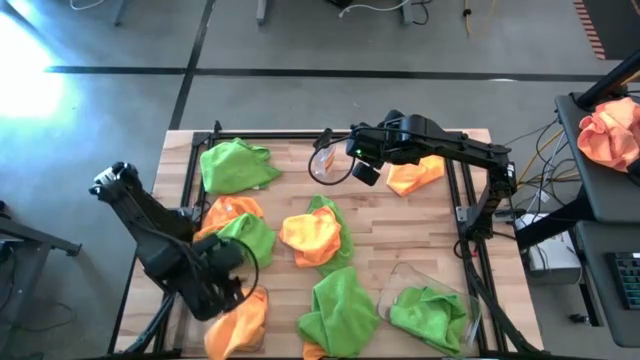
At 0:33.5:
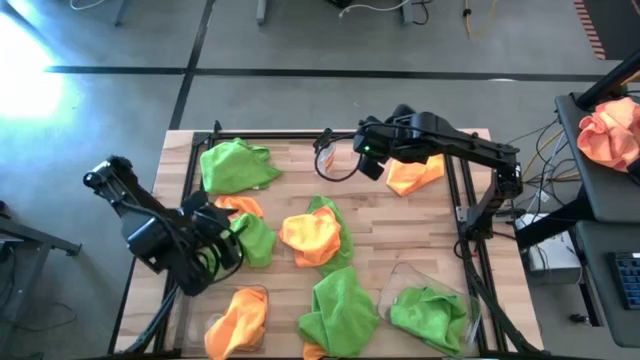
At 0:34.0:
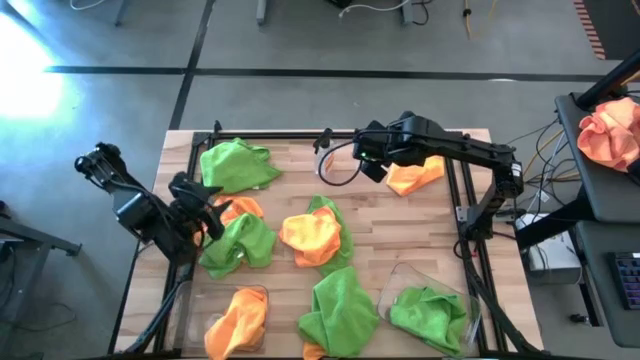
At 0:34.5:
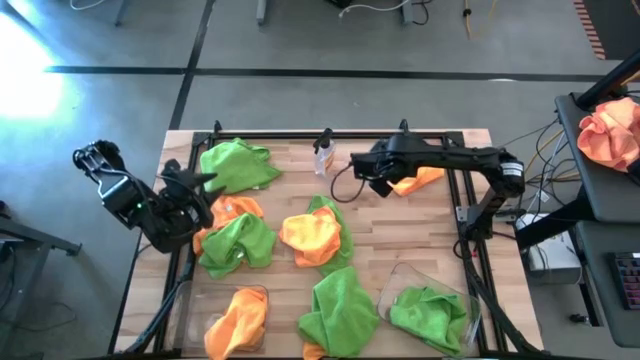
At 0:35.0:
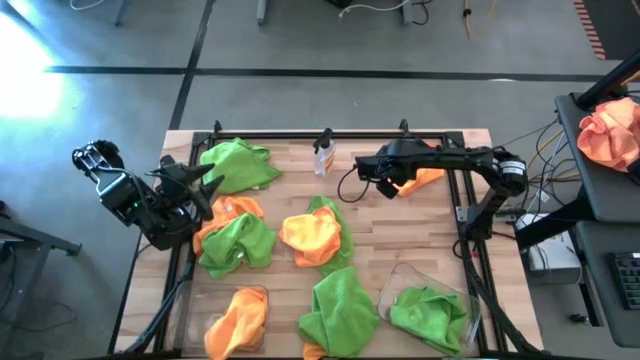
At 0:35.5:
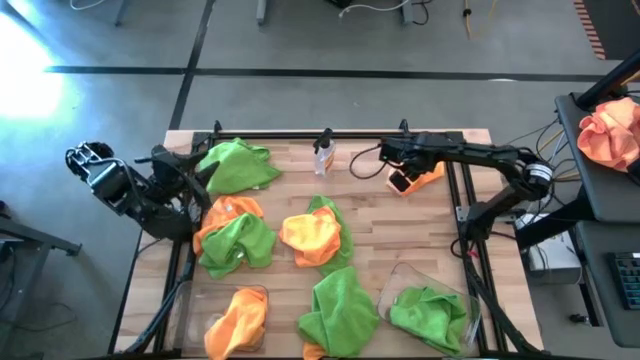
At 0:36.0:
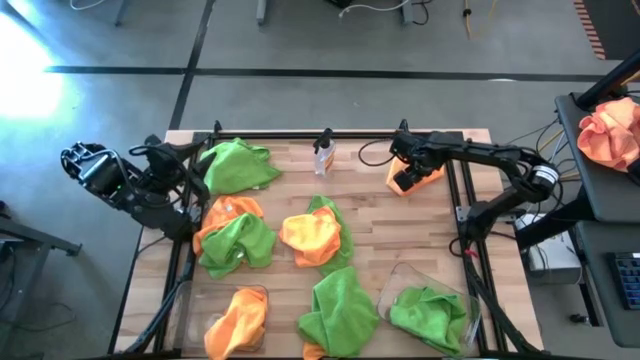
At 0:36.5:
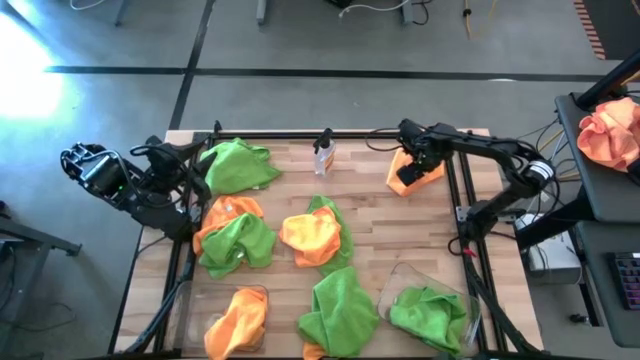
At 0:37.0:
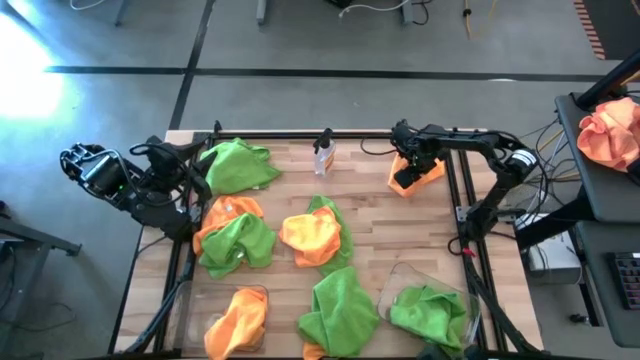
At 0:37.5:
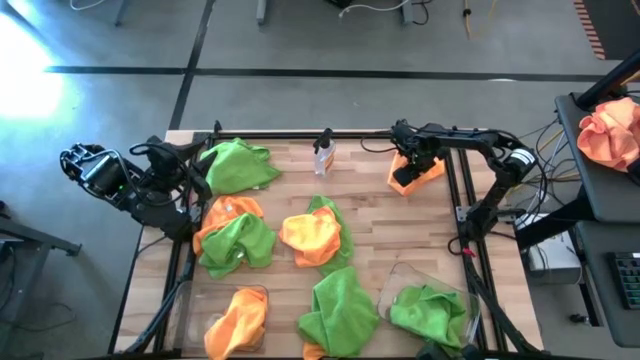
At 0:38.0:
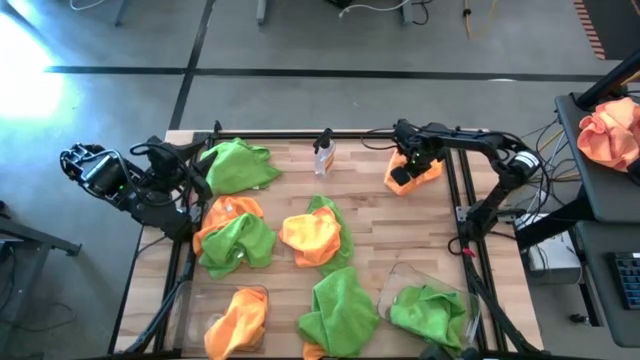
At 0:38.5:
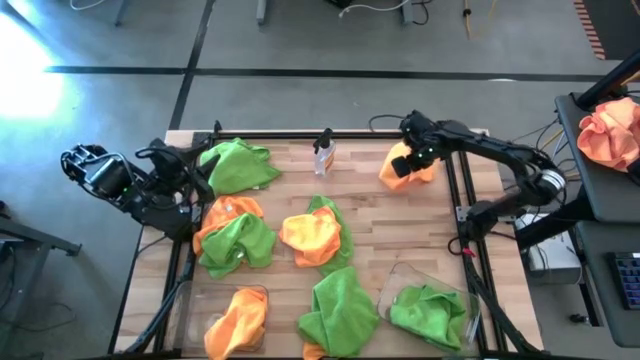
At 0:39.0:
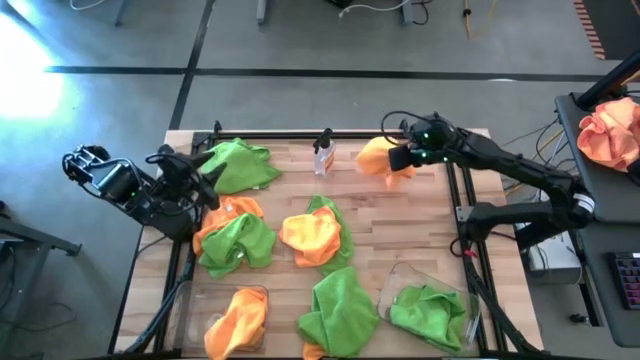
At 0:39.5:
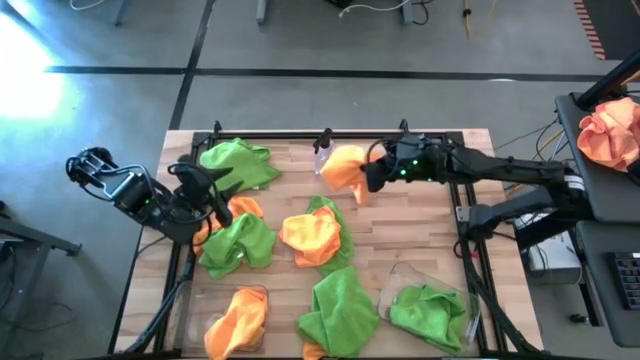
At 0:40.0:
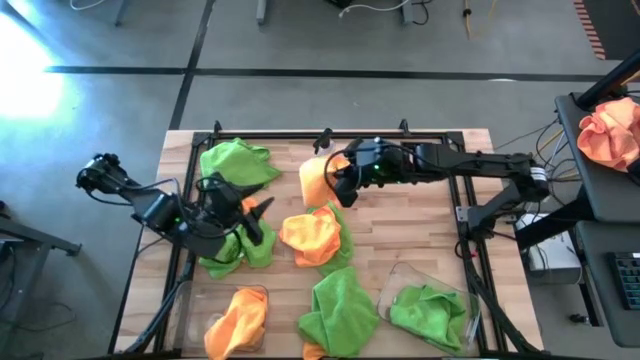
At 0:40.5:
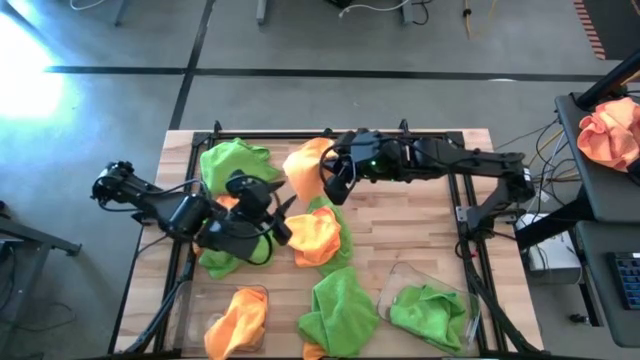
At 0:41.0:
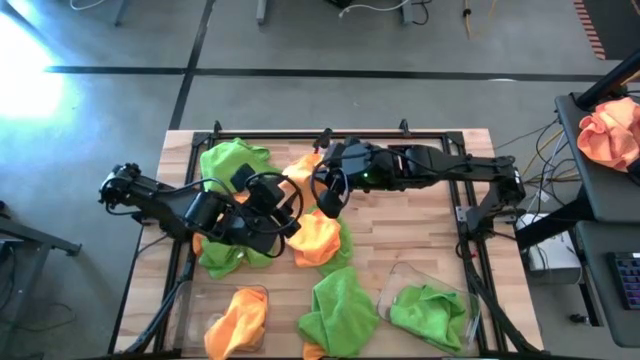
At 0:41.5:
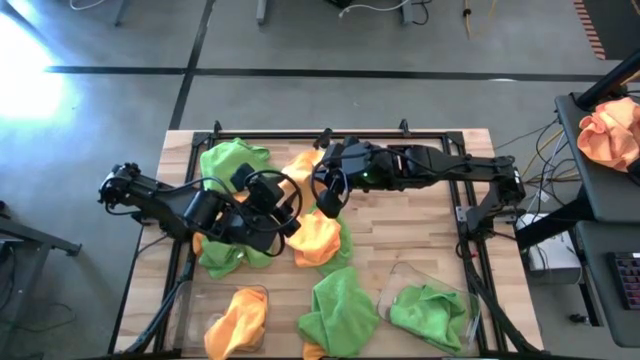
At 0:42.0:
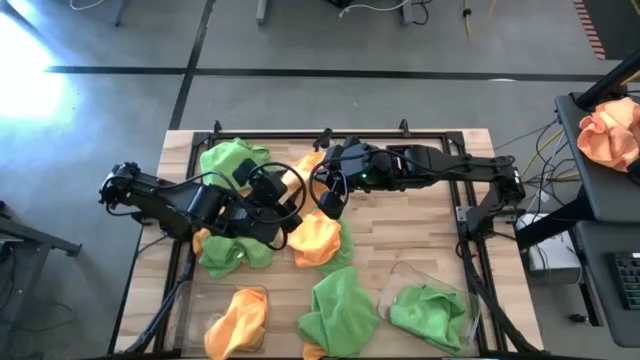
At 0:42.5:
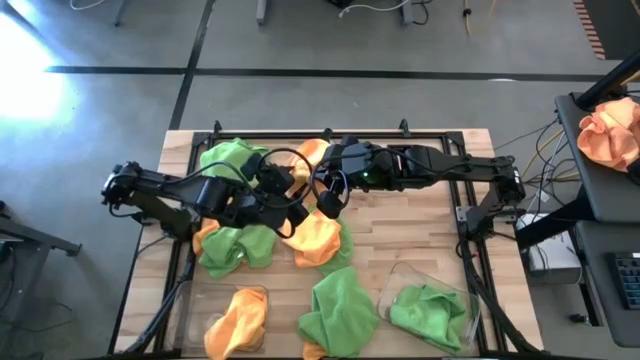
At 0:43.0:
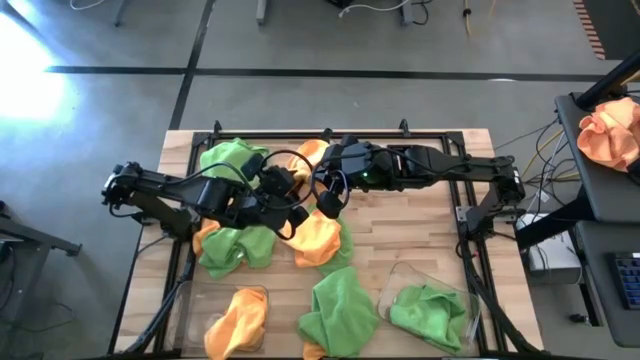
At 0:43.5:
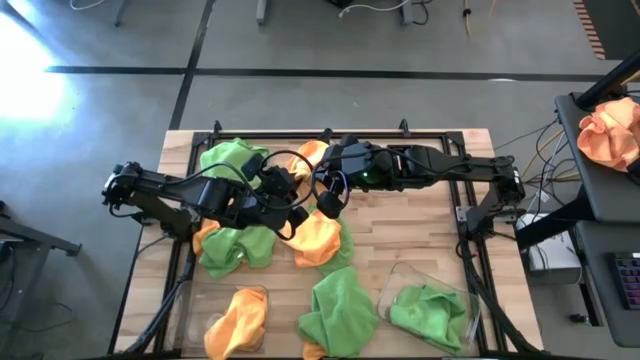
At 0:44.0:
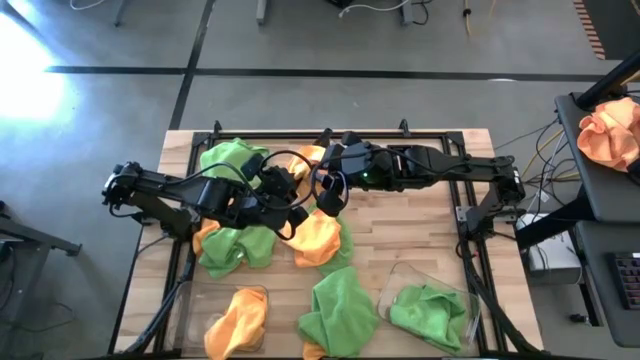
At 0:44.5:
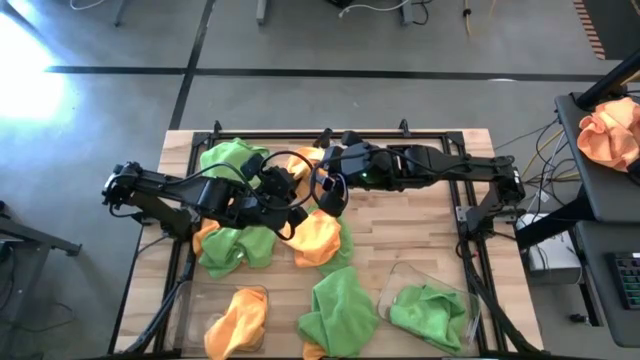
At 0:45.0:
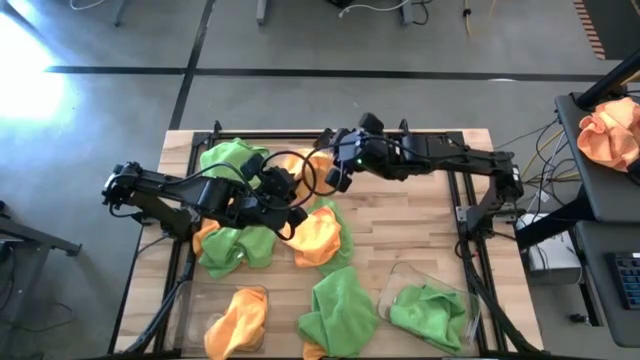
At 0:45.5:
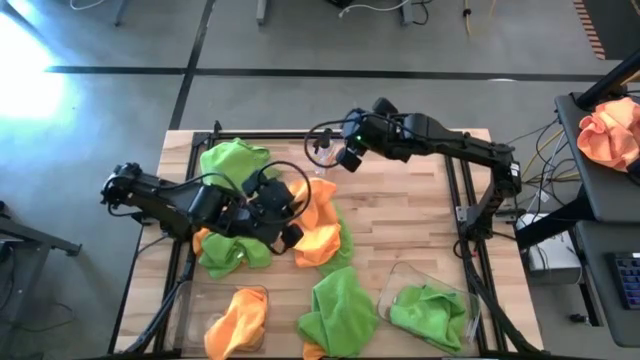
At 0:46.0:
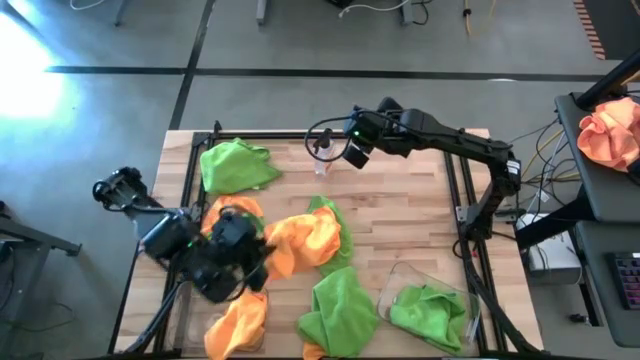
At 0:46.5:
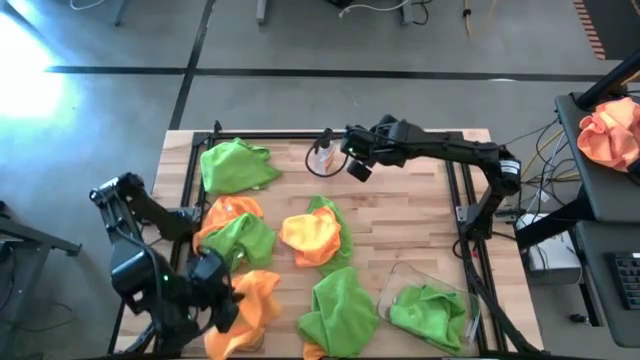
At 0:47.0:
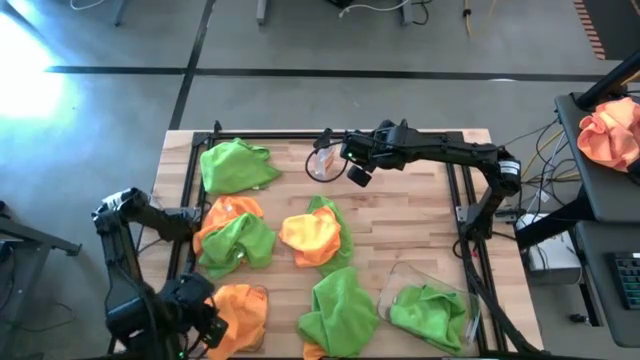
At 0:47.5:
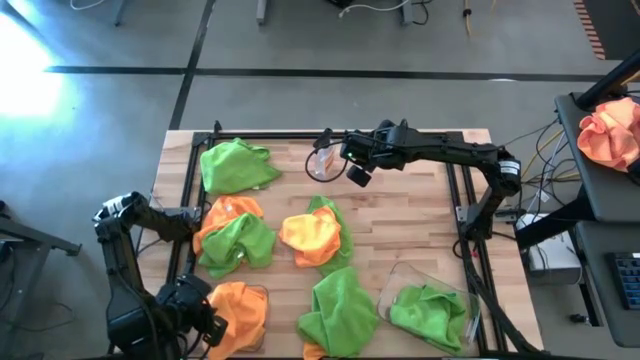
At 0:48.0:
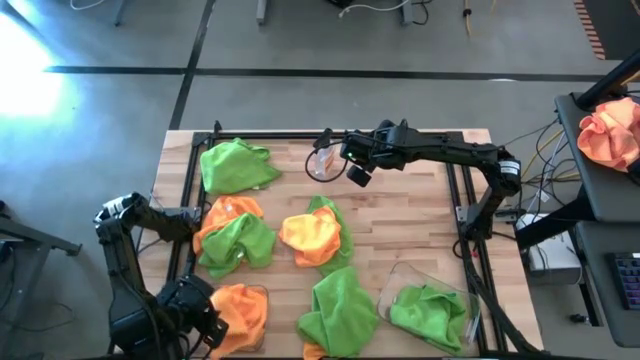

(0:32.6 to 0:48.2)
Task: Sort microfiber towel by color & place in baskets
Put the orange microfiber cloth into the left transparent bin

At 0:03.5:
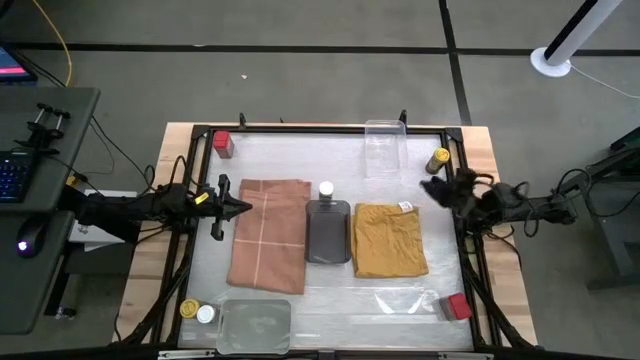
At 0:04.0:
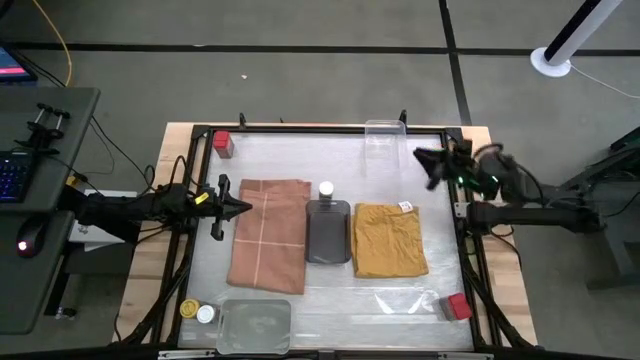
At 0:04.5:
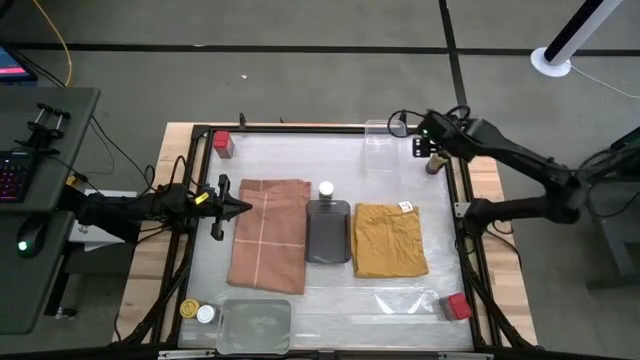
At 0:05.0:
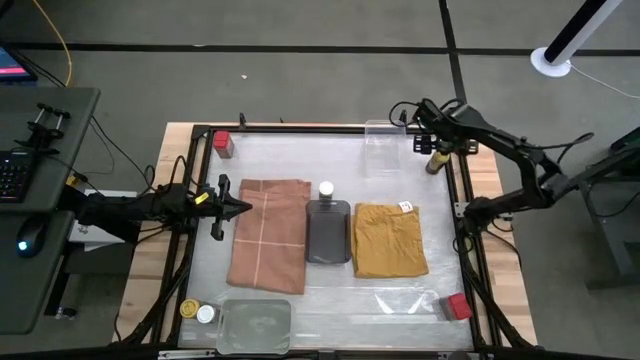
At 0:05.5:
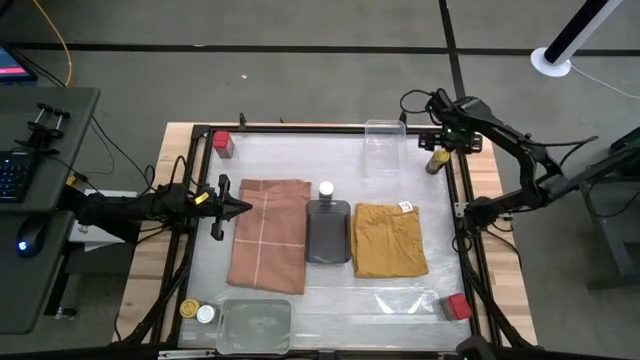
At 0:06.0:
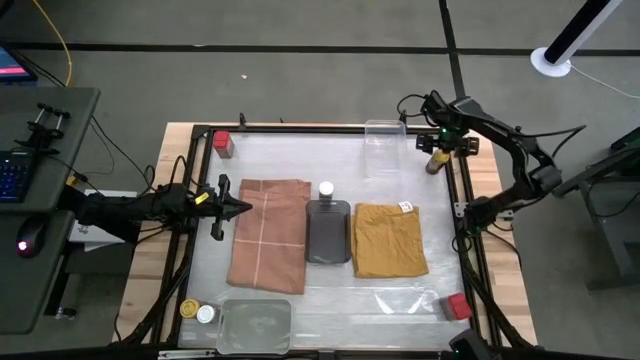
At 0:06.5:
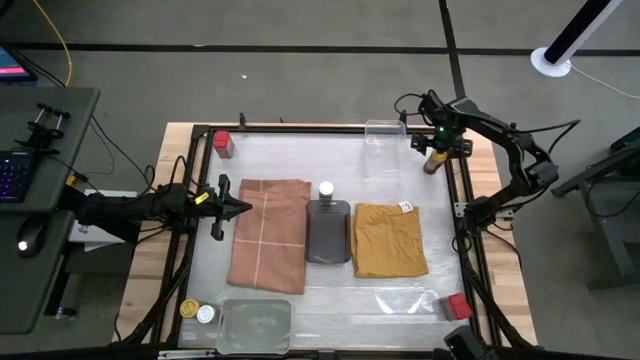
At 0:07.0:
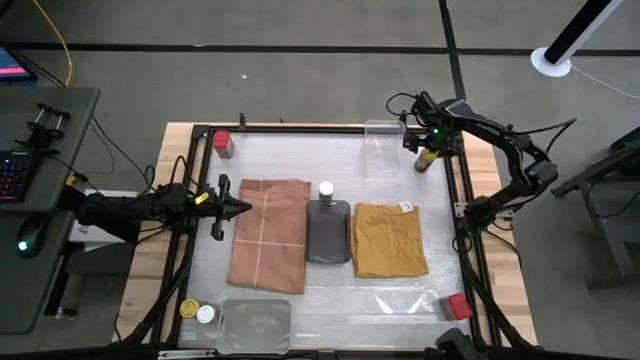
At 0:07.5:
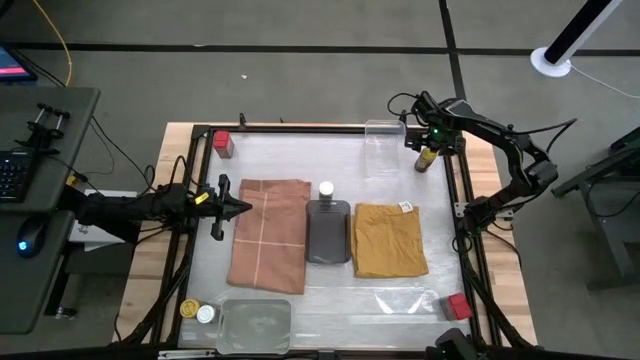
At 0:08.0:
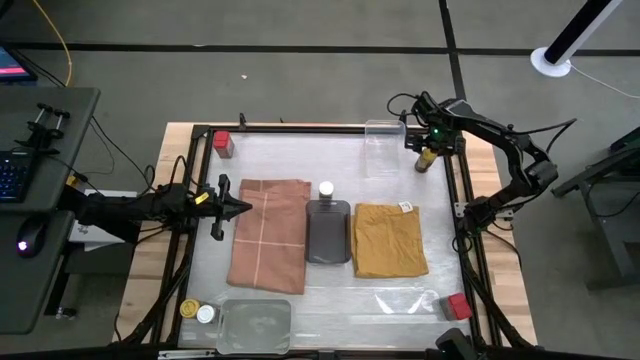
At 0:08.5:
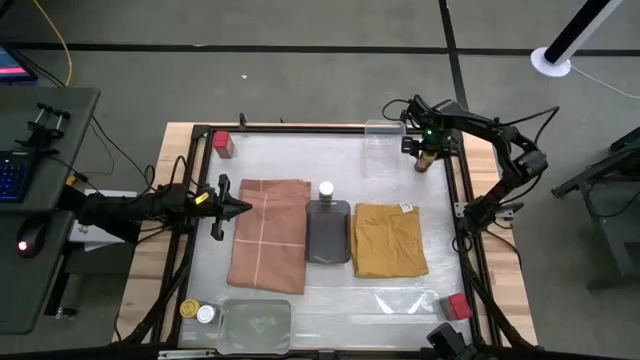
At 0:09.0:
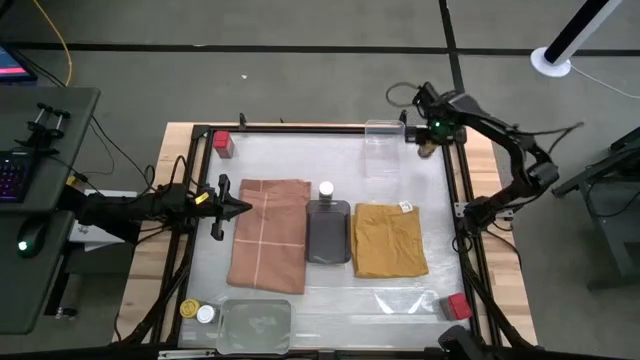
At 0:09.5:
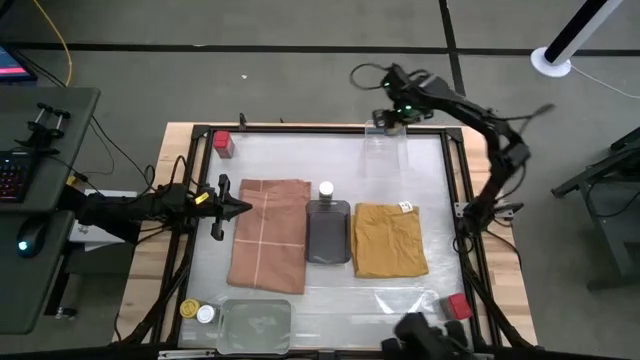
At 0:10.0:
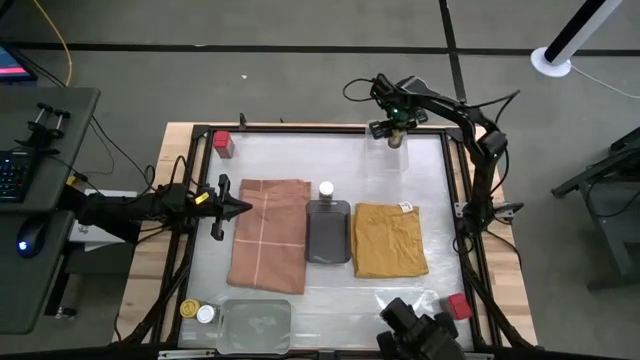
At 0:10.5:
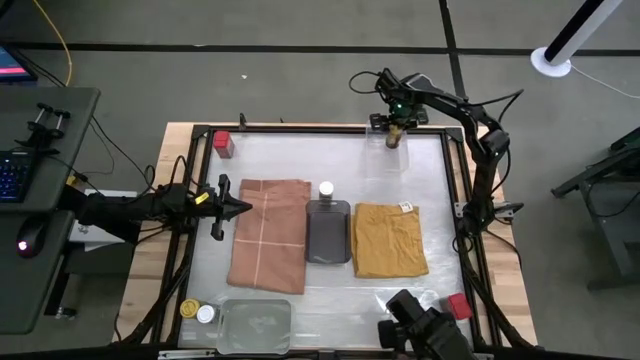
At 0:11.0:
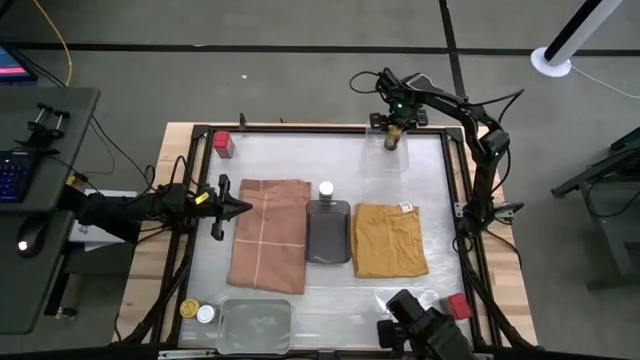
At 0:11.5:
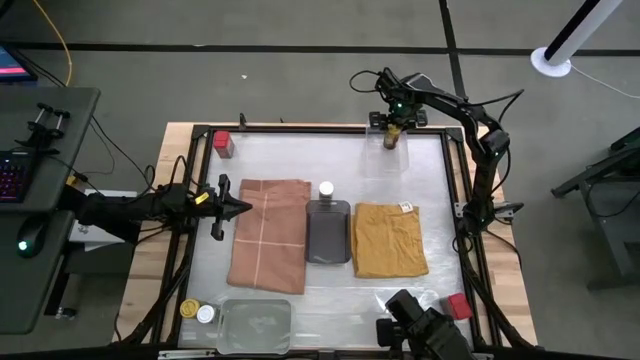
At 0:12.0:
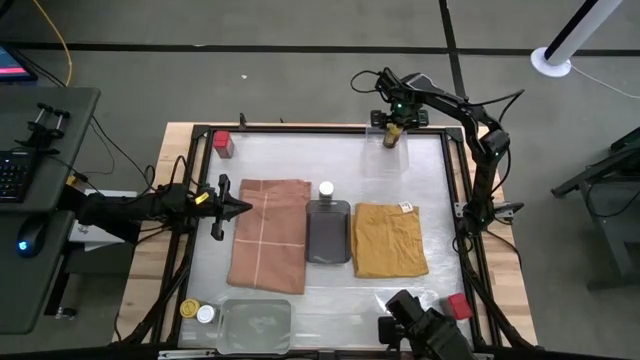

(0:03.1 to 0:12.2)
Task: Sort spices by type
Put the top yellow seasoning bottle into the transparent bin
